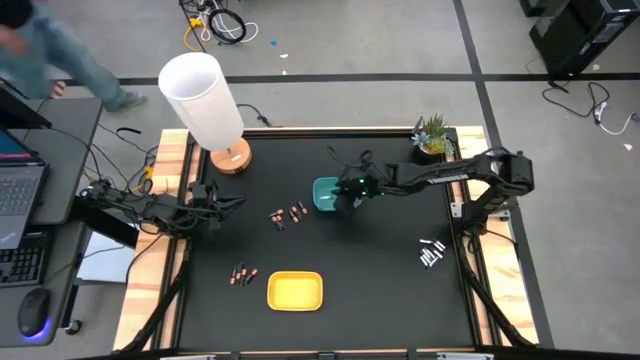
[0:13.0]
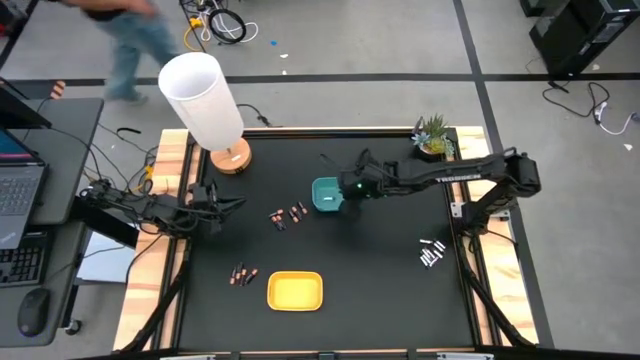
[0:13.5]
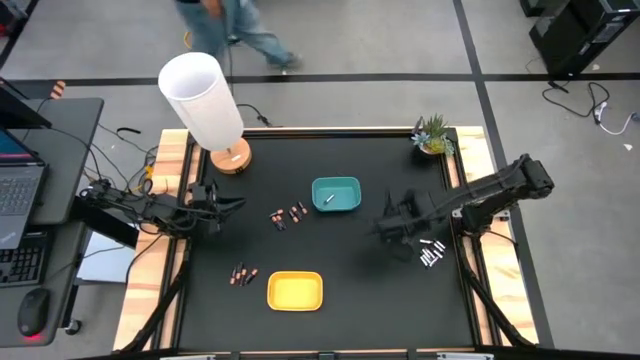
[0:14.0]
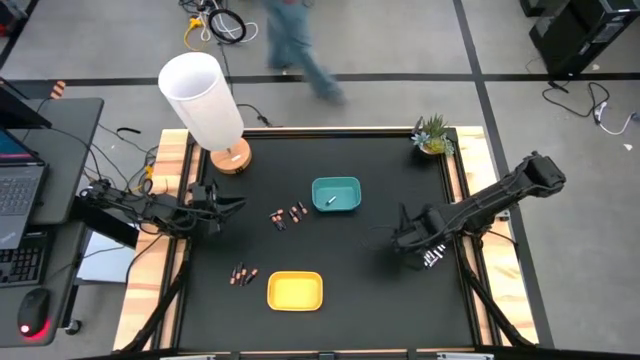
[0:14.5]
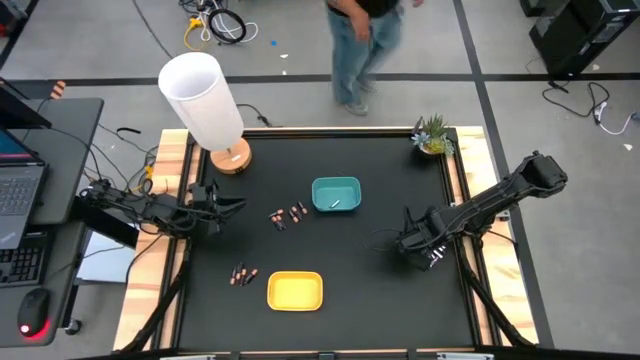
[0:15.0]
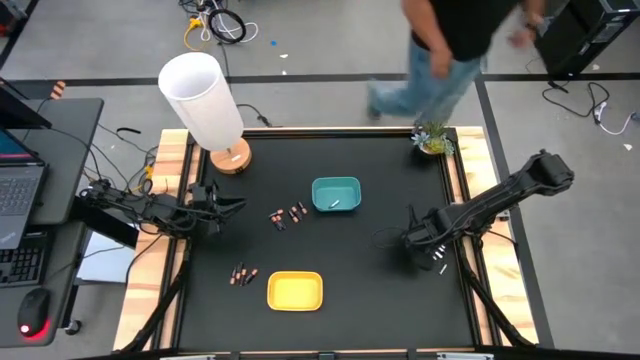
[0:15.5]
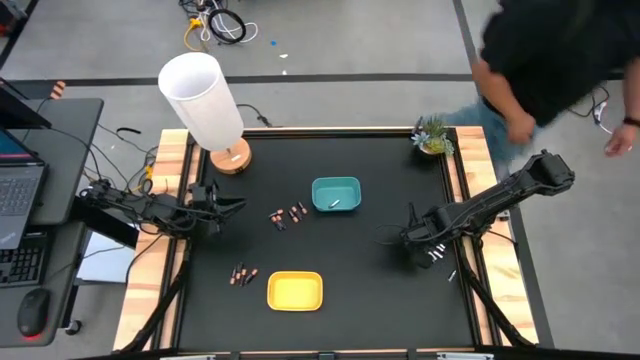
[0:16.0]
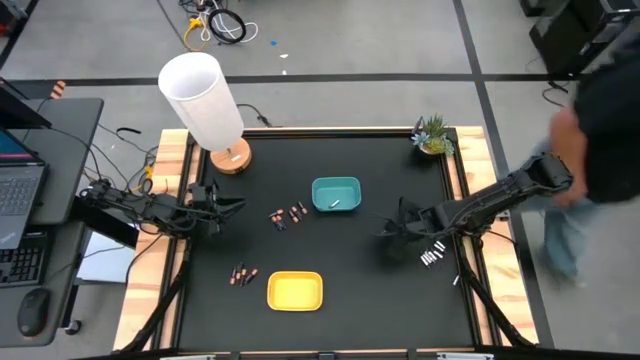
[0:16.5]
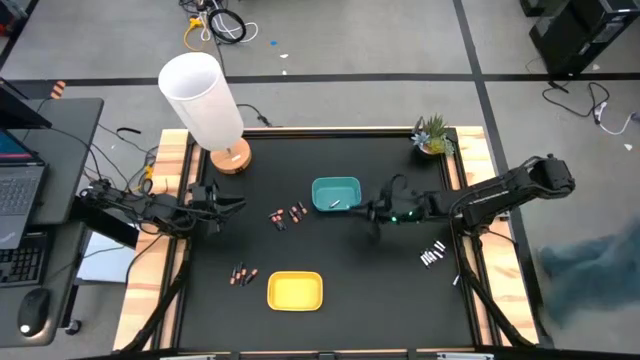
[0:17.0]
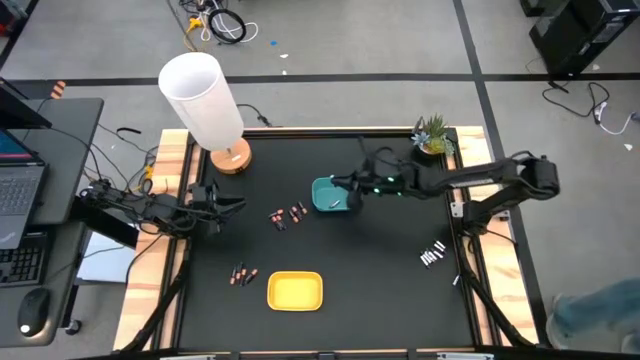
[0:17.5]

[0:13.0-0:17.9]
Task: Sort batteries
Put the silver battery into the blue bin

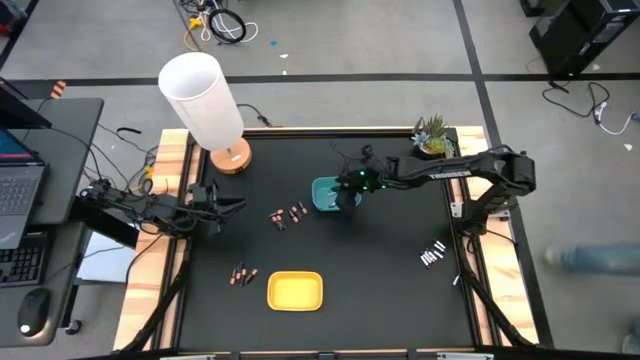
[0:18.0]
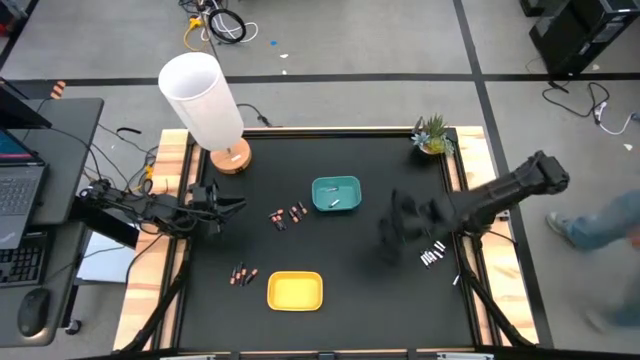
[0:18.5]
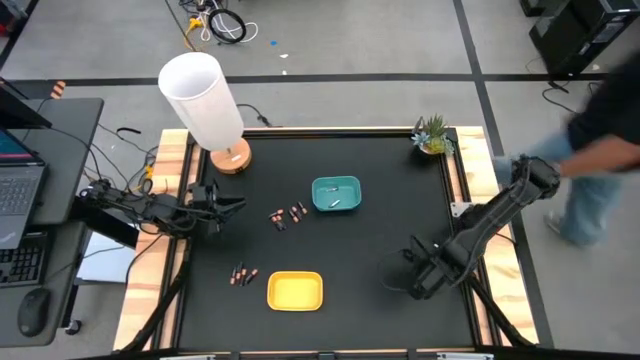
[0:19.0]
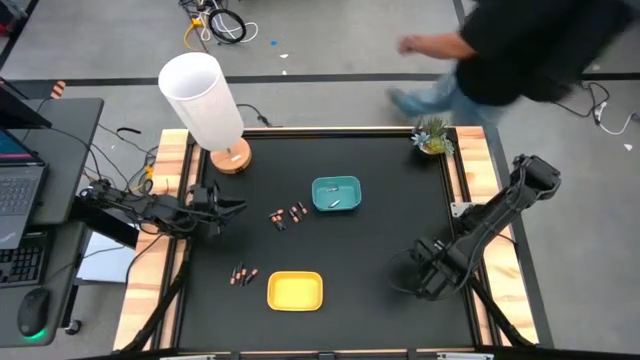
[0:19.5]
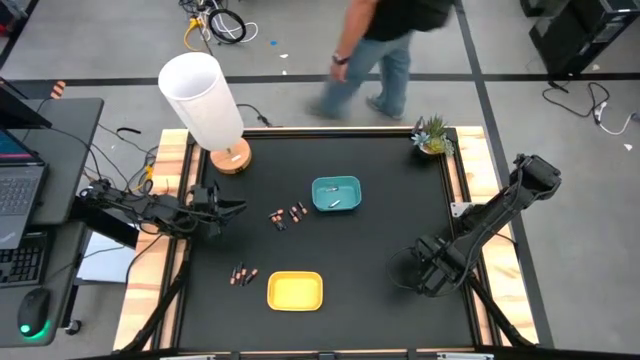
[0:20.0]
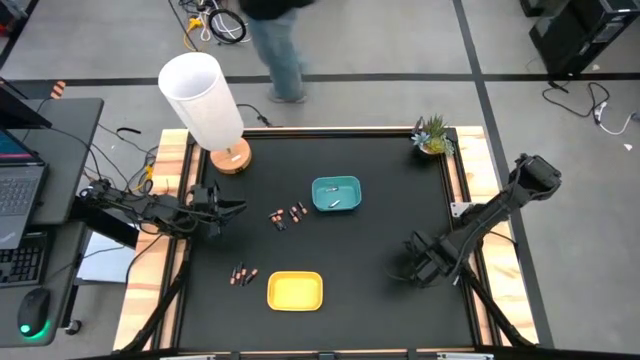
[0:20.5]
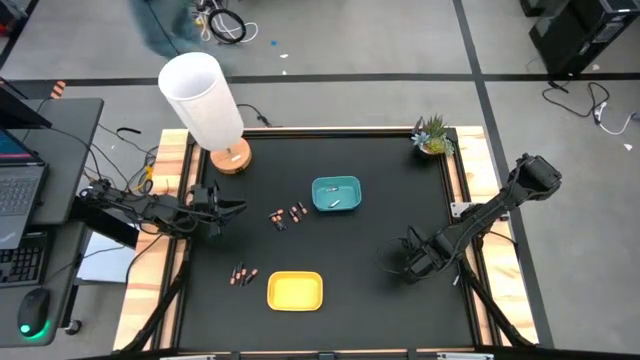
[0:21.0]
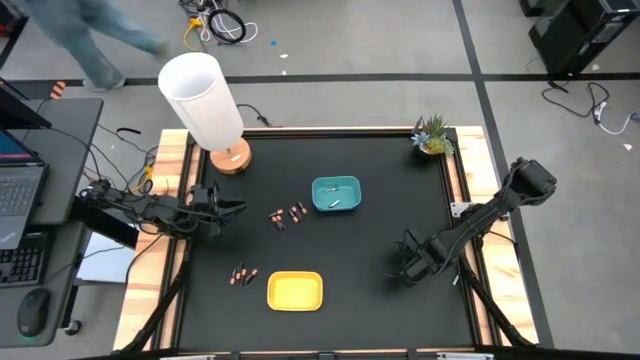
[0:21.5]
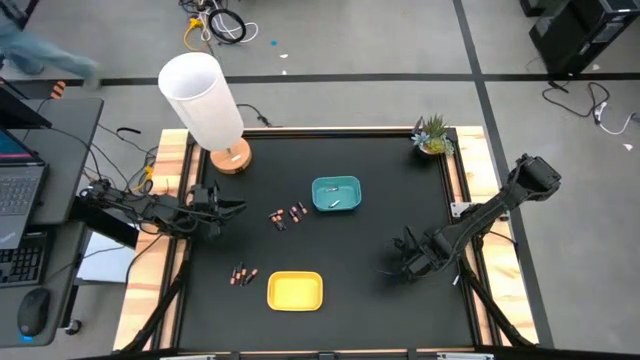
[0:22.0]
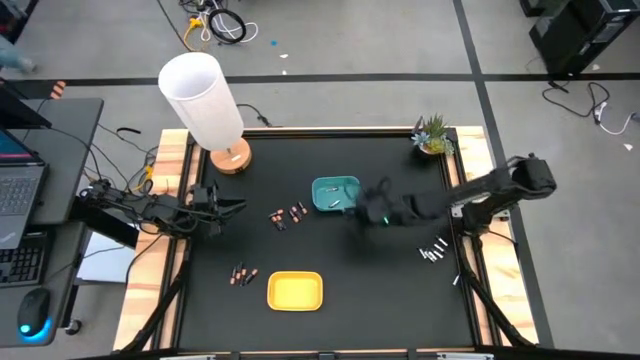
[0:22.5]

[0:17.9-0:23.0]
Put the silver battery into the blue bin

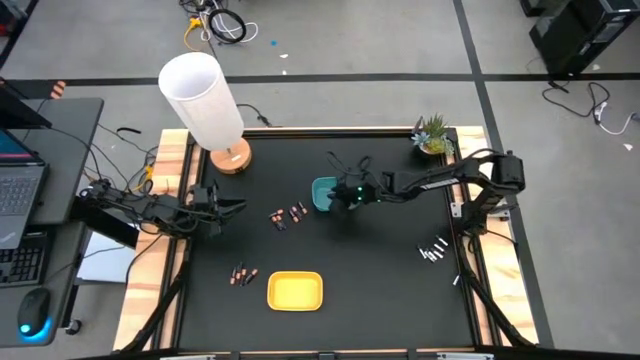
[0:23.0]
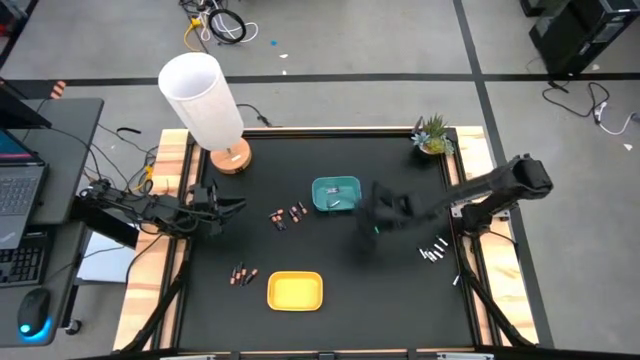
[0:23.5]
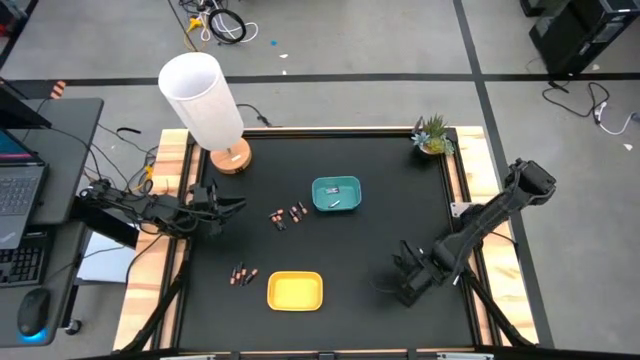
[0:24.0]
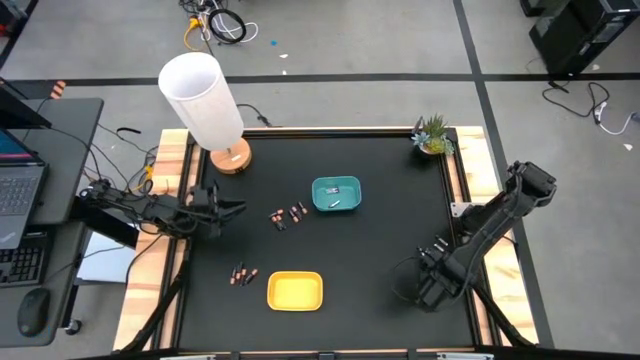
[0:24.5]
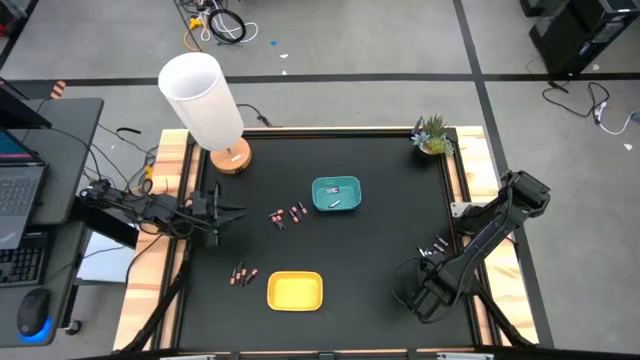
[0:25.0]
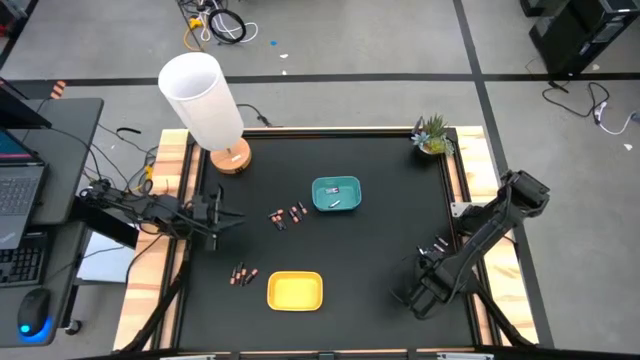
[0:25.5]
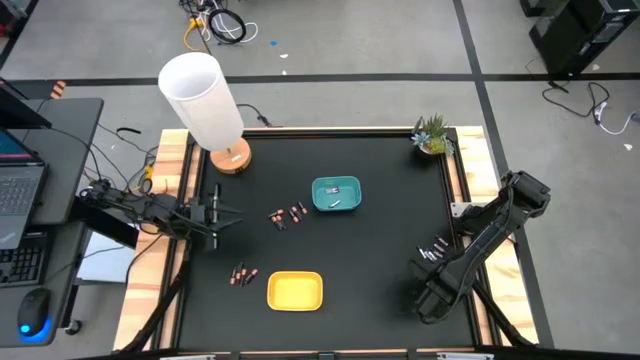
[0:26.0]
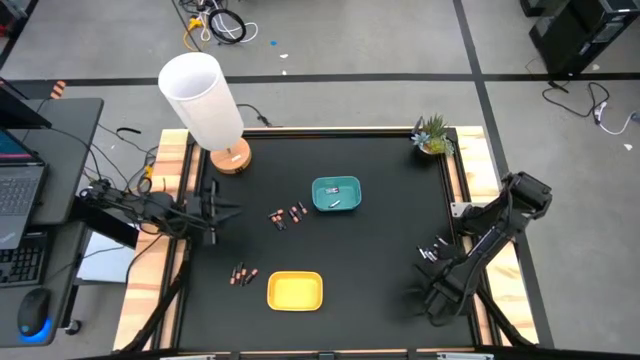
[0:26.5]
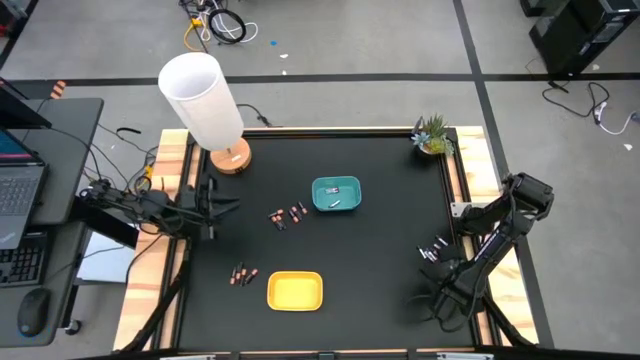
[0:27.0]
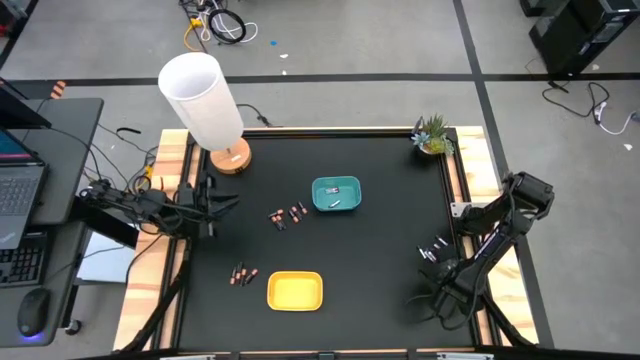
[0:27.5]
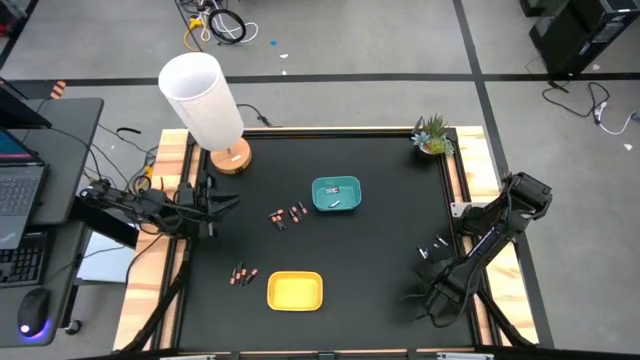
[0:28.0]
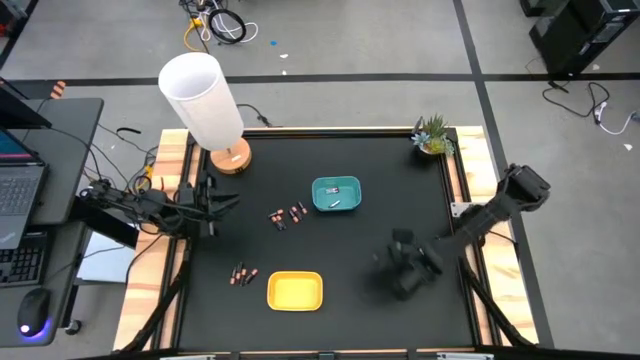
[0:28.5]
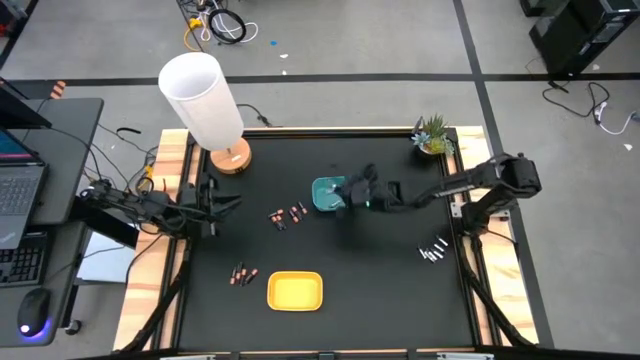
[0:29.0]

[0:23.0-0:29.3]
Put the silver battery into the blue bin

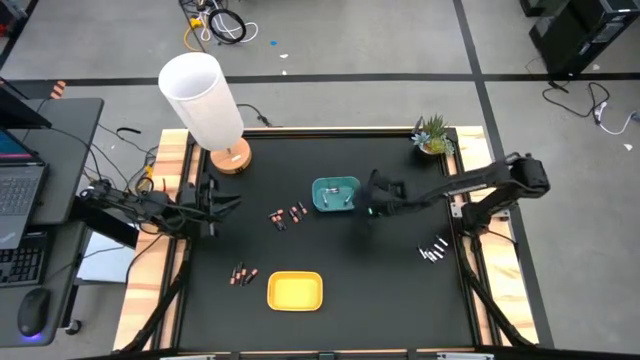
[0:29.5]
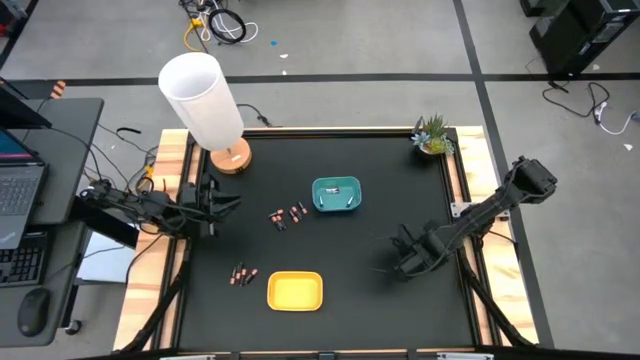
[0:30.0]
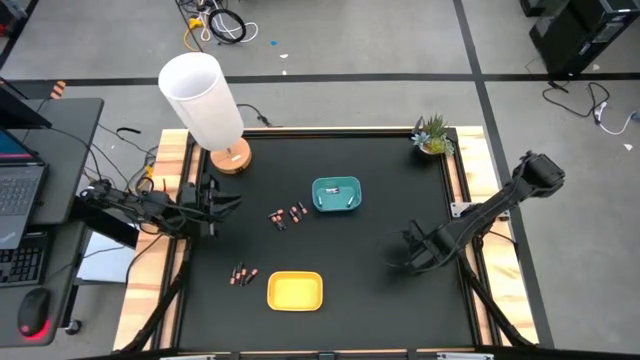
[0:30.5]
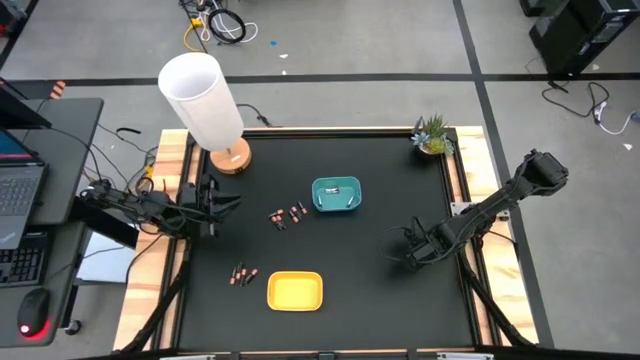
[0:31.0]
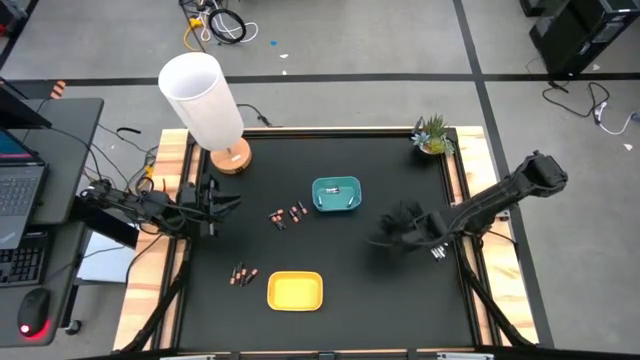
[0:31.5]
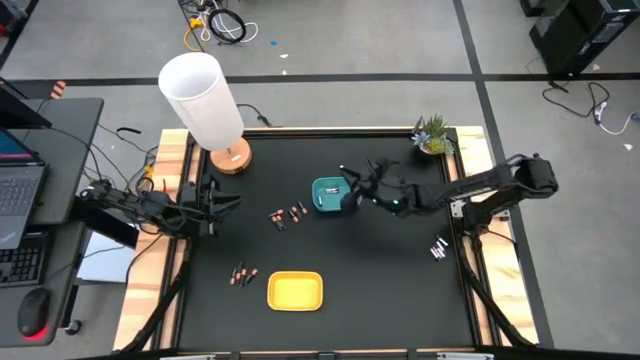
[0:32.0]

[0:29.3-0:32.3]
Put the silver battery into the blue bin

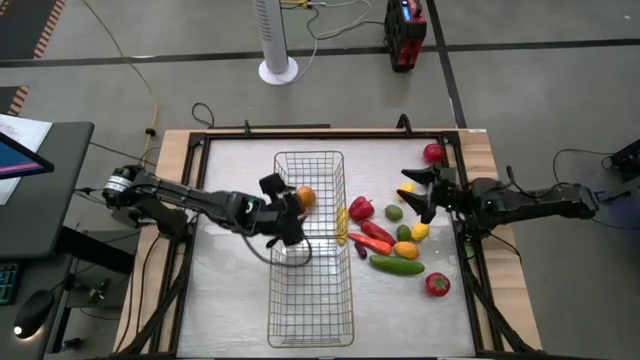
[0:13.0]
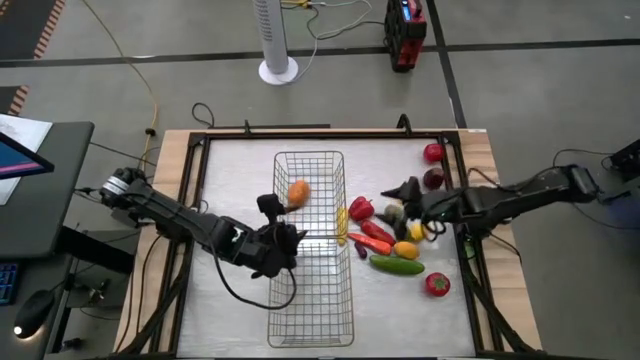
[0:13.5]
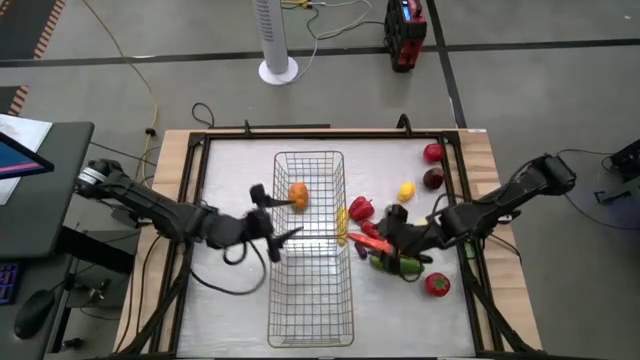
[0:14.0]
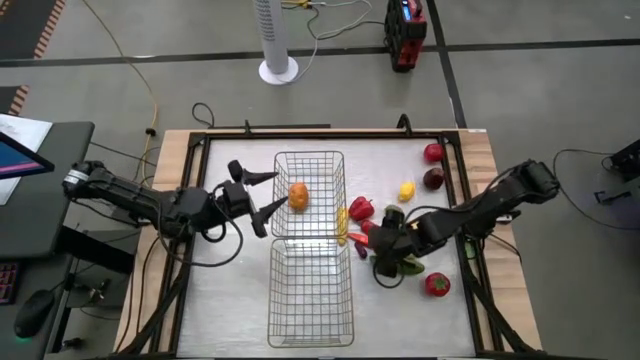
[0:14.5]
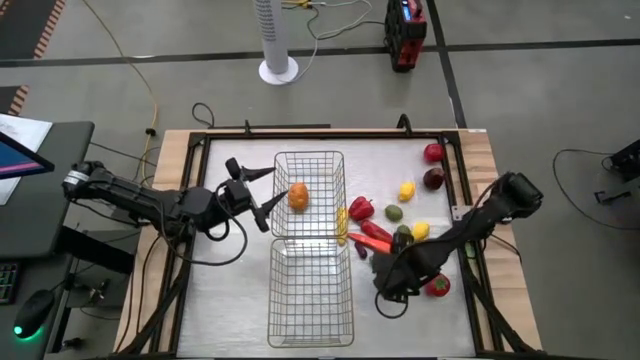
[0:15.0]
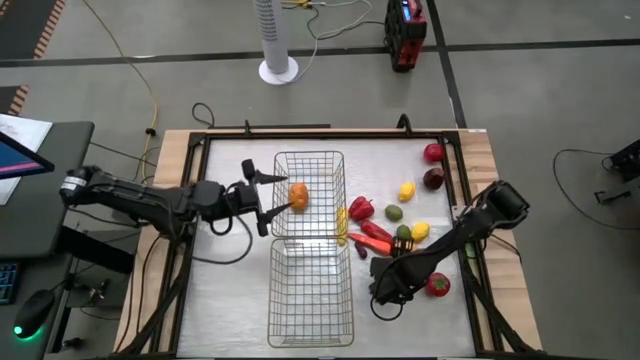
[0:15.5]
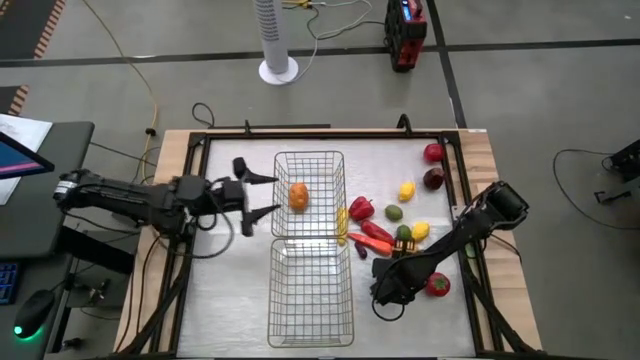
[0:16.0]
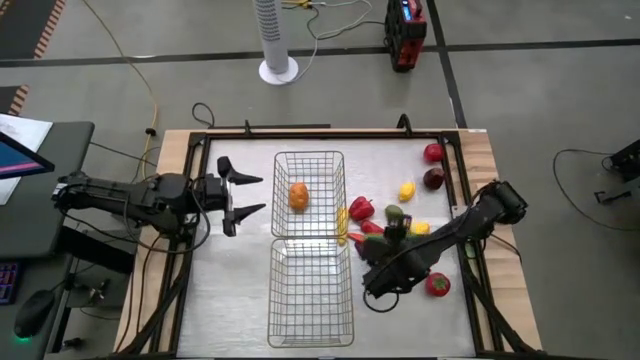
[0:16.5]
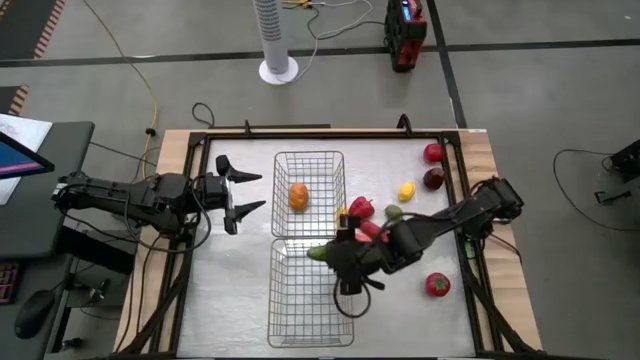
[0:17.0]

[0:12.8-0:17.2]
Task: Sort produce into baskets
Put the cucumber into the top wire basket
